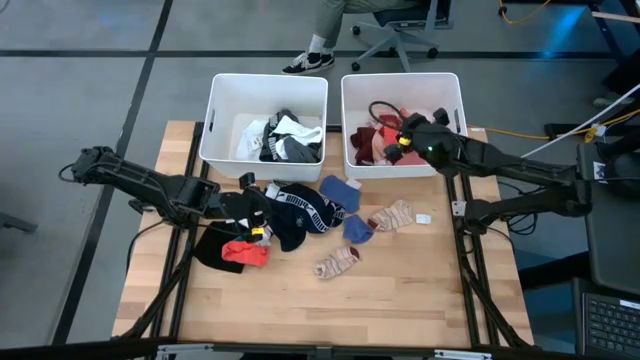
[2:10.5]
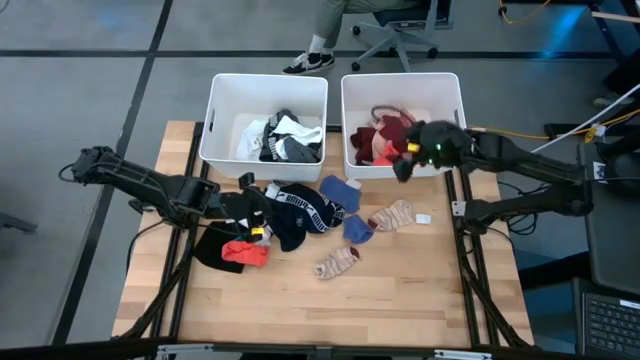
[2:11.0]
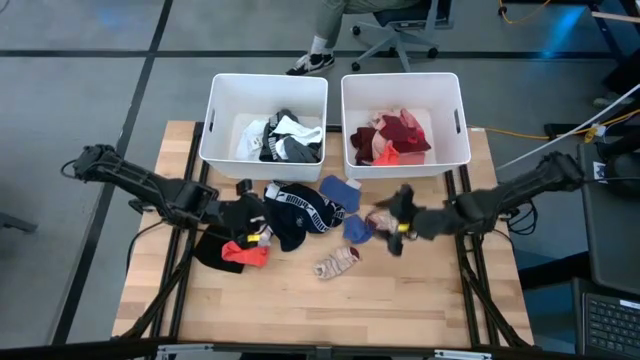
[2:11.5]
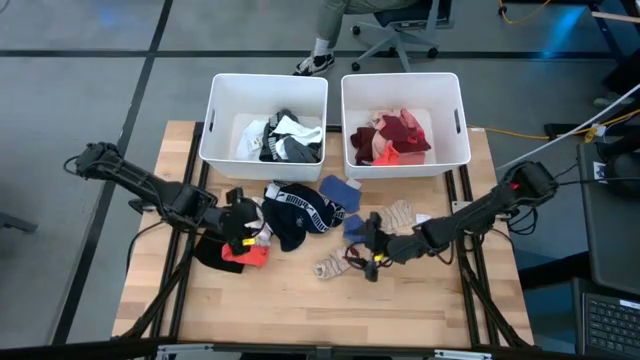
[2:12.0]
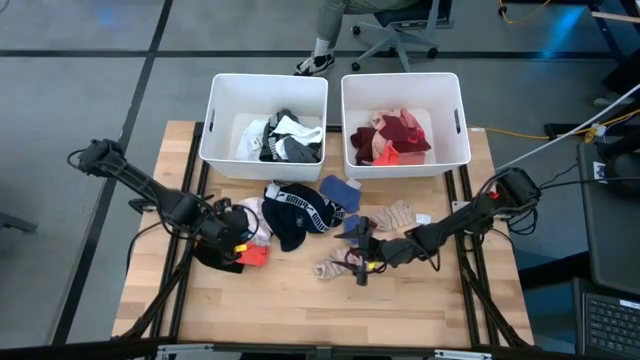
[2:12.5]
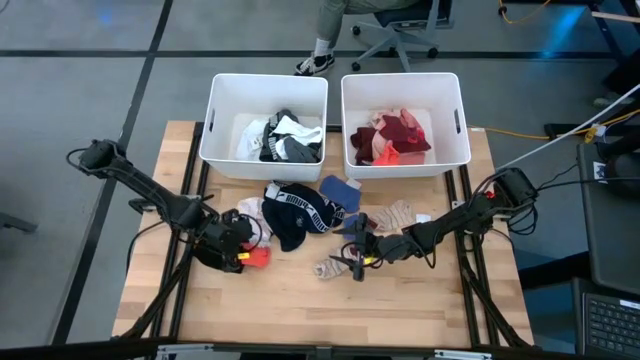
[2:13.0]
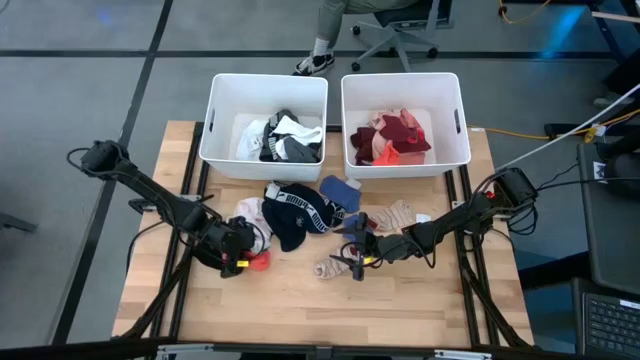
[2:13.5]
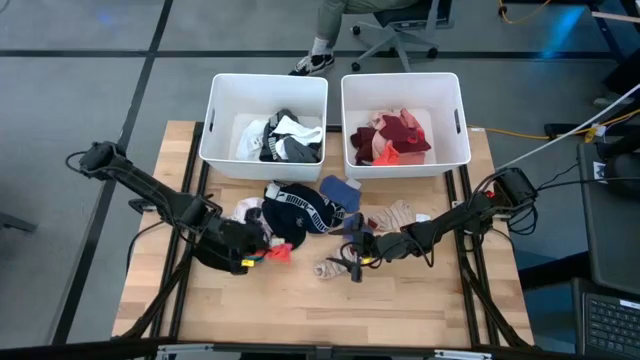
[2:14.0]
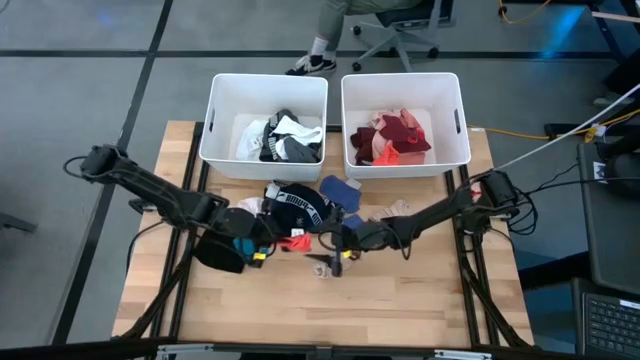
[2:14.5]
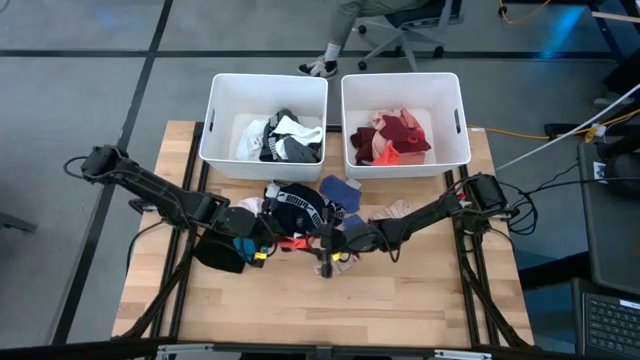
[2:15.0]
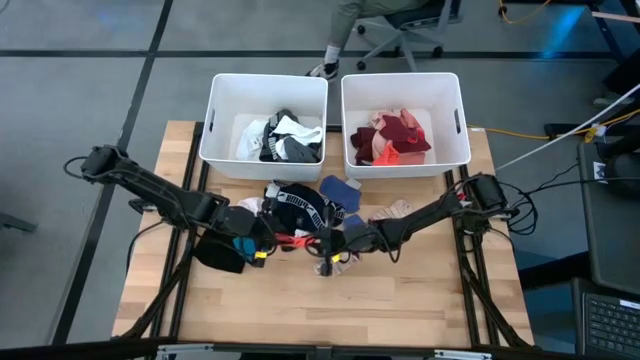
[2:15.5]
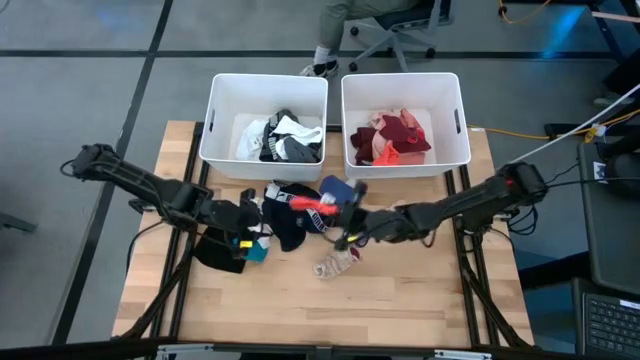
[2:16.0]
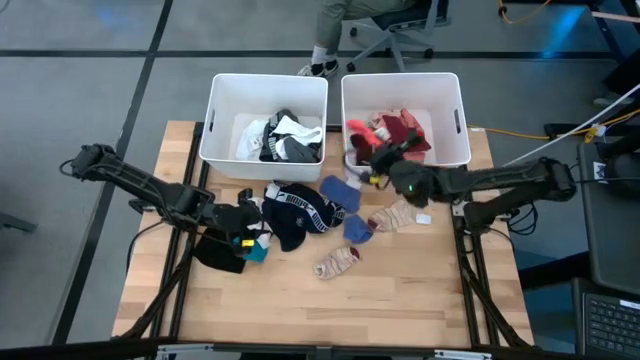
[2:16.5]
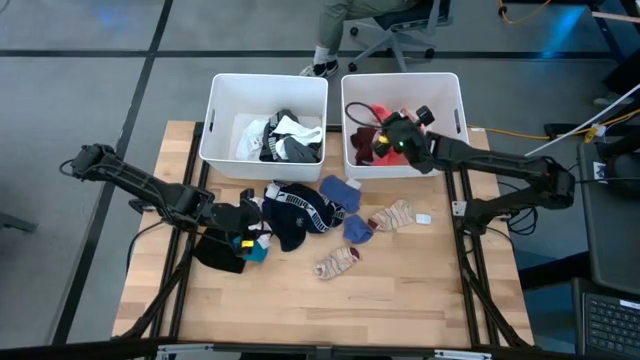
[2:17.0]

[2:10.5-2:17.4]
Task: Sort clothes
Put the orange sock into the right white laundry bin

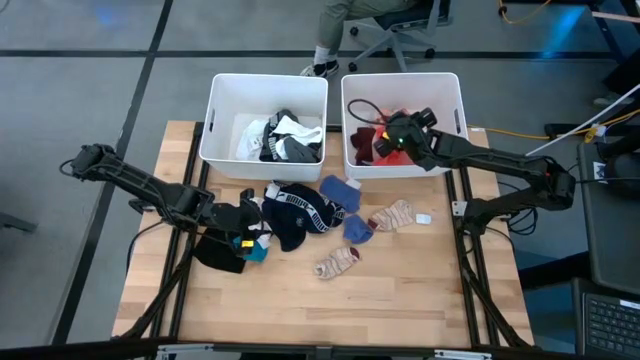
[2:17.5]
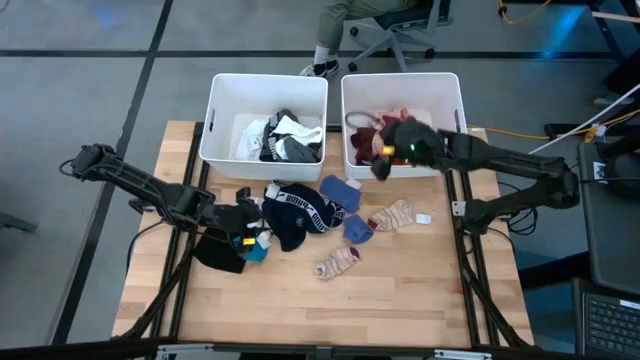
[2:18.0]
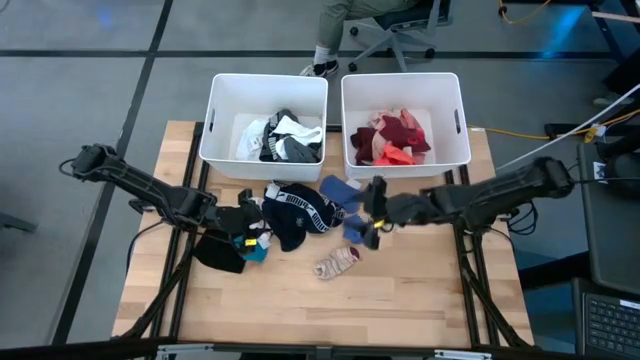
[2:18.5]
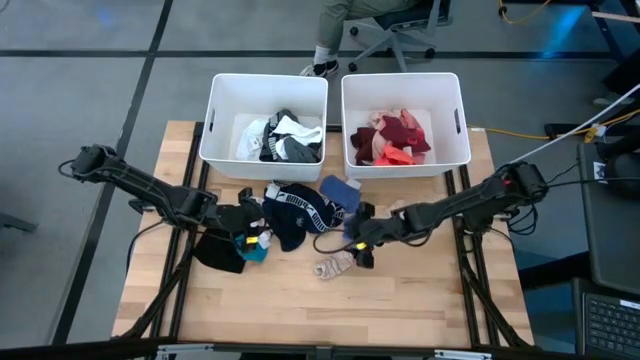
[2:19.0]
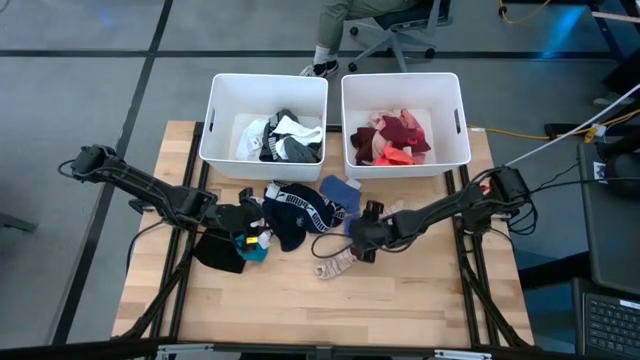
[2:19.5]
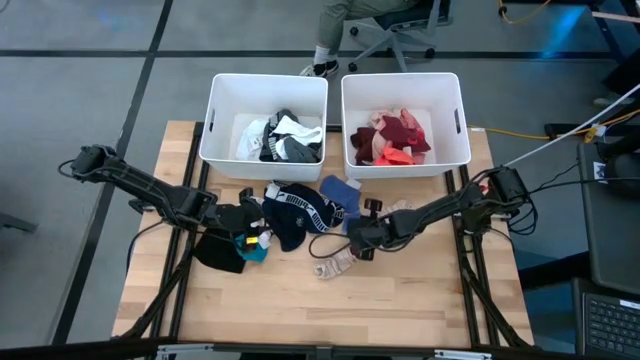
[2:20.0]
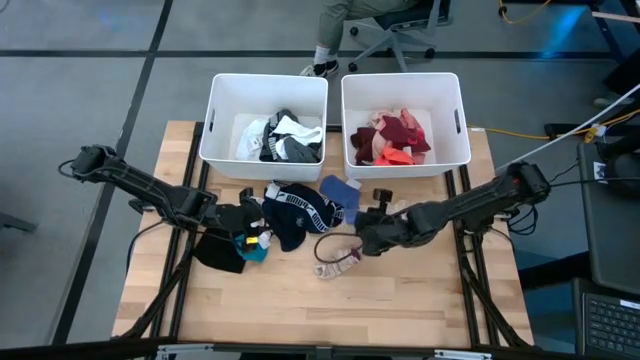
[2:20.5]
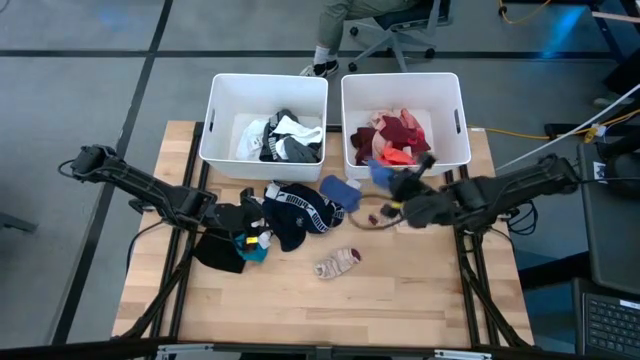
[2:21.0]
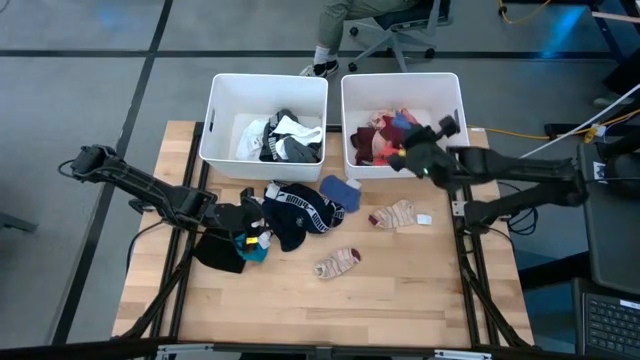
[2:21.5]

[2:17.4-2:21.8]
Put the bottom blue sock into the right white laundry bin

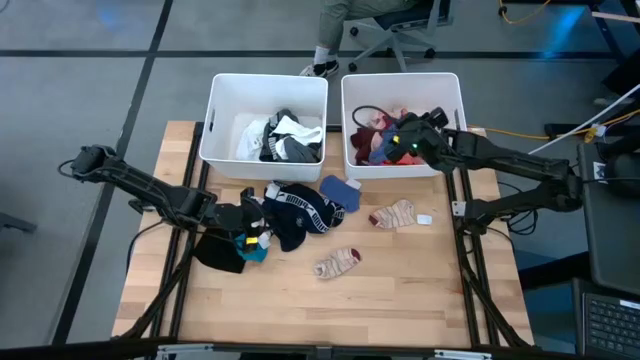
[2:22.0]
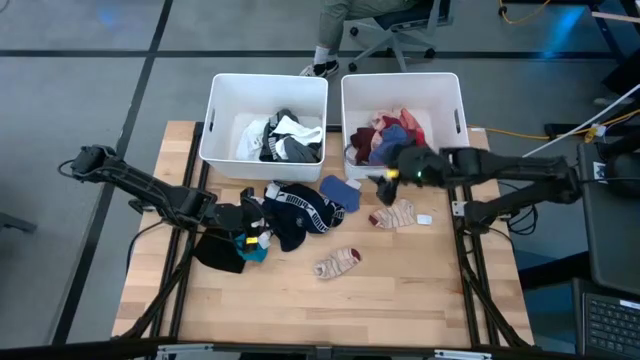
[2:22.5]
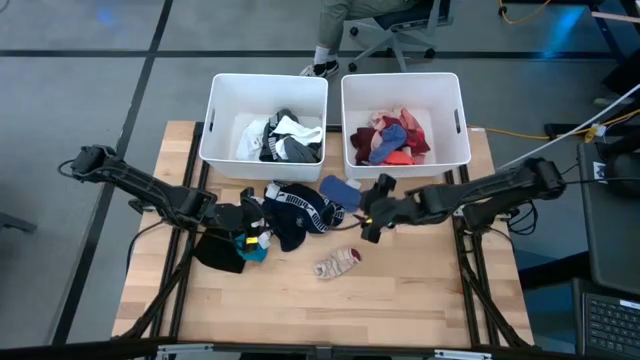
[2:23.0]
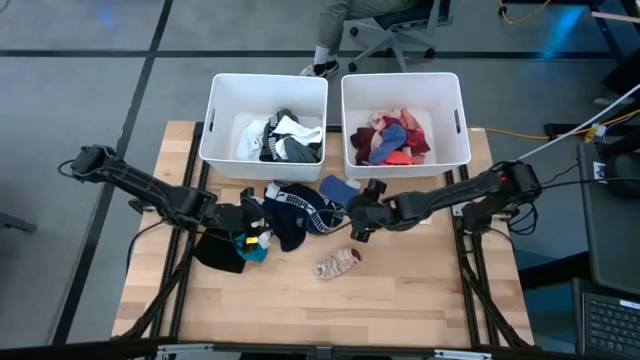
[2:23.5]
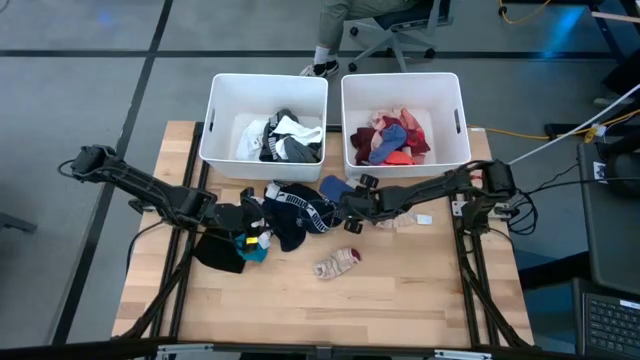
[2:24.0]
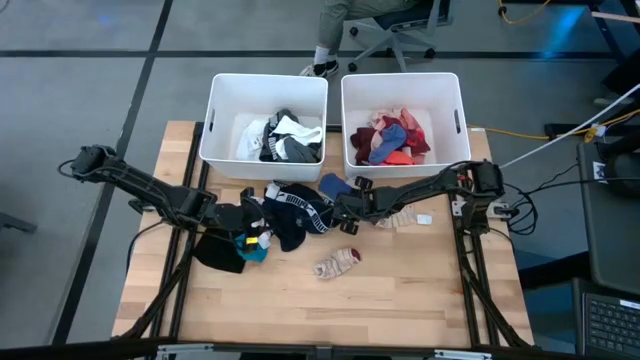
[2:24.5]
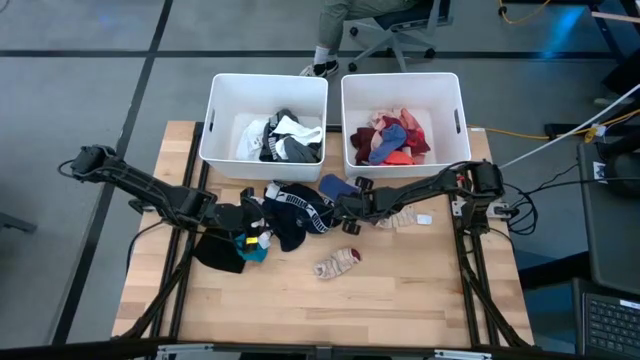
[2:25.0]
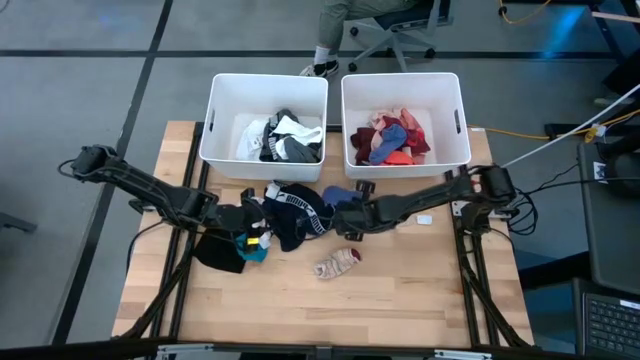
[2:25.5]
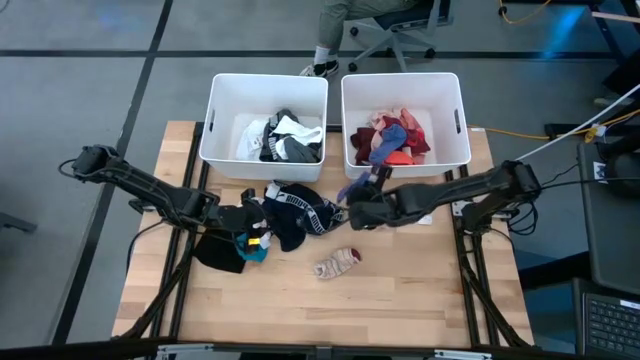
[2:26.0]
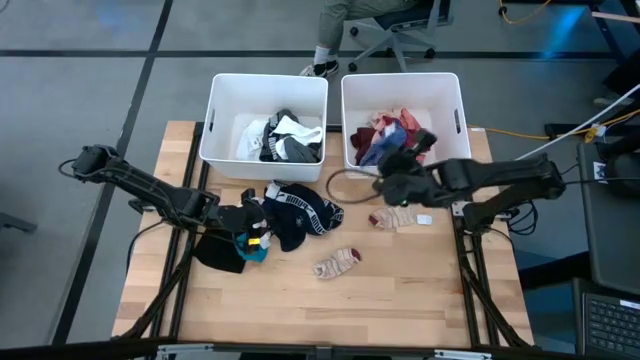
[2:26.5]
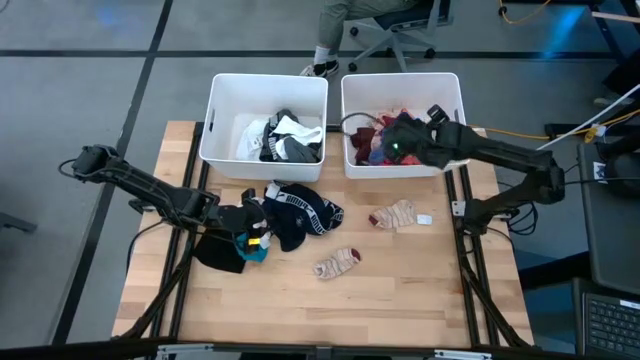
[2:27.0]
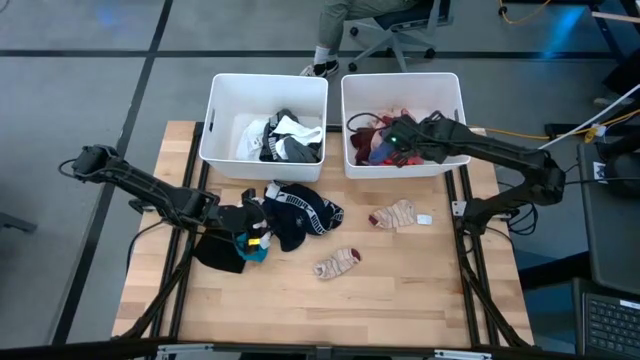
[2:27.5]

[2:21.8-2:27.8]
Put the blue sock into the right white laundry bin

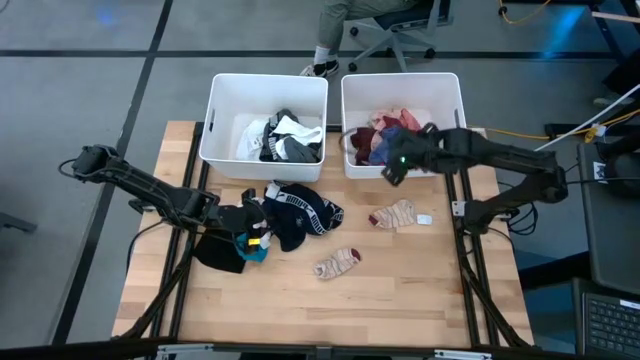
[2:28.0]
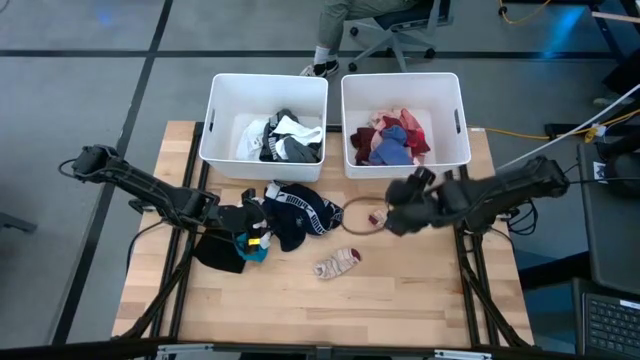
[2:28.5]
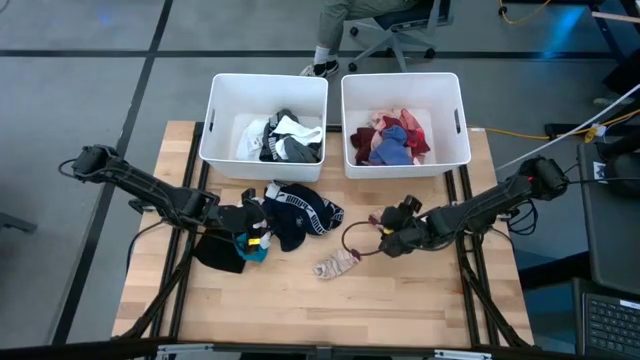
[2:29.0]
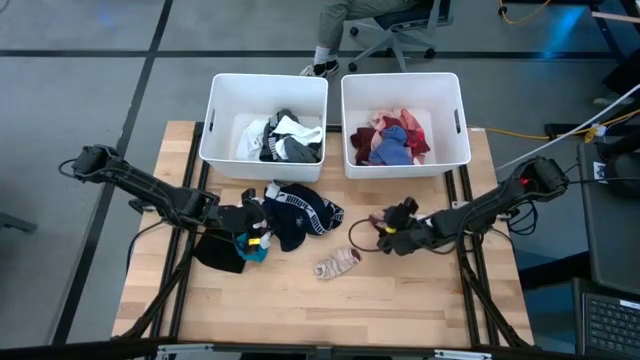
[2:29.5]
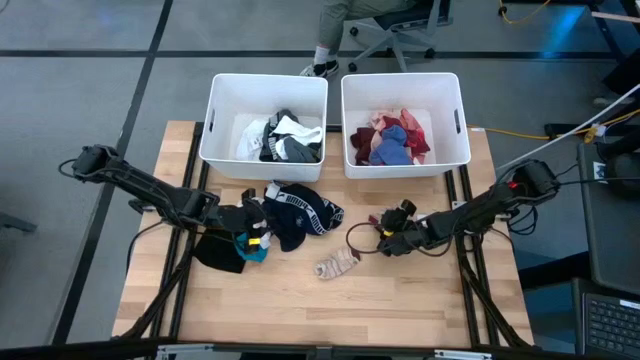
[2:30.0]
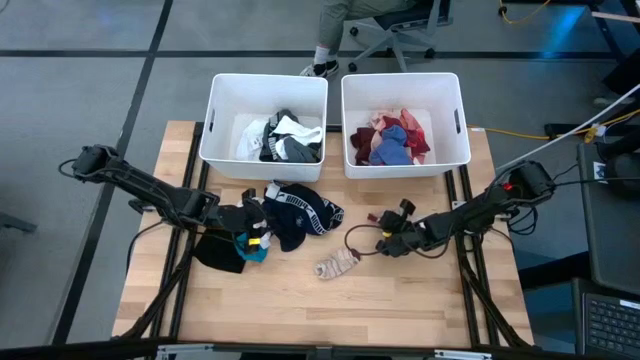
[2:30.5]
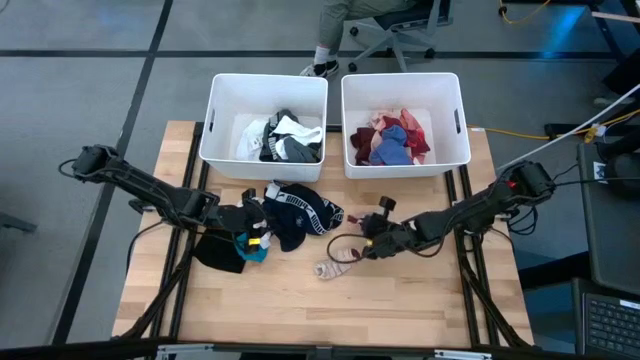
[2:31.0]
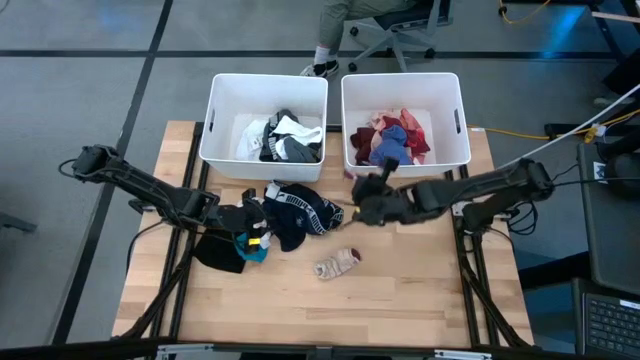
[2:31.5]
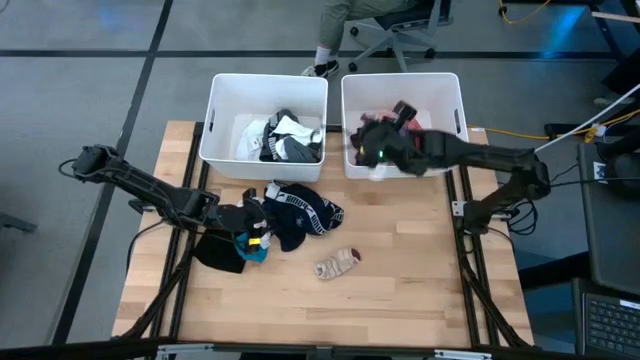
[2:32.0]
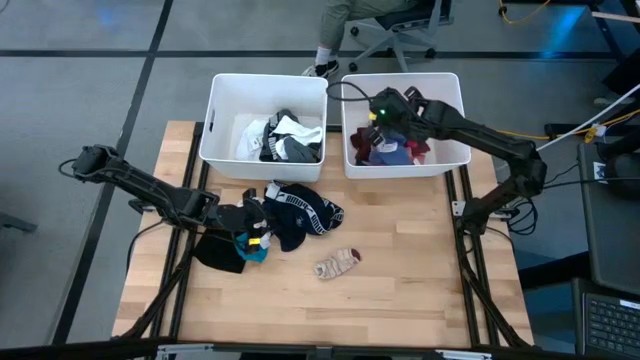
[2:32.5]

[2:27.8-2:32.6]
Put the top brown stripe sock into the right white laundry bin
